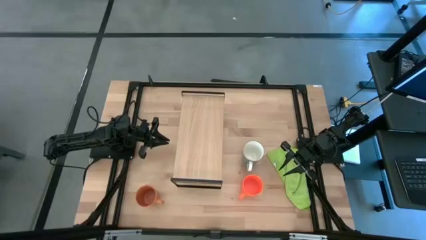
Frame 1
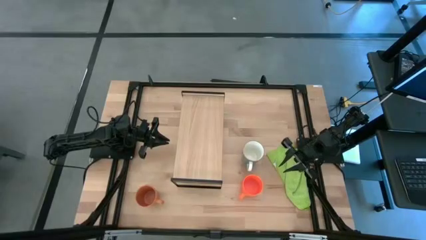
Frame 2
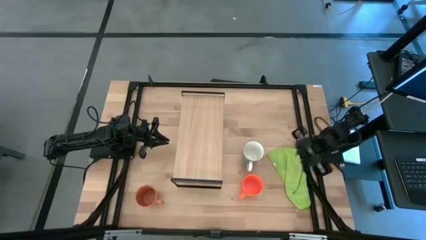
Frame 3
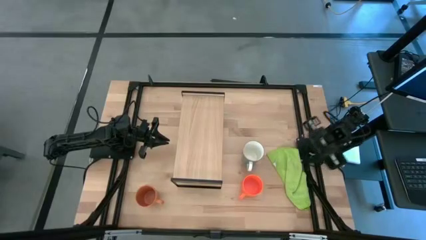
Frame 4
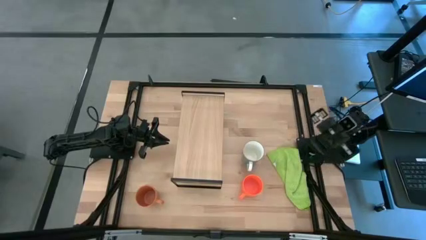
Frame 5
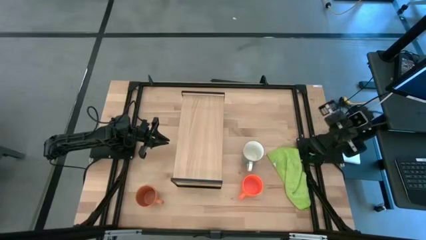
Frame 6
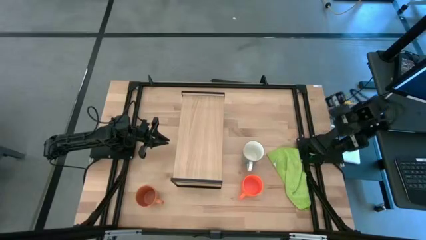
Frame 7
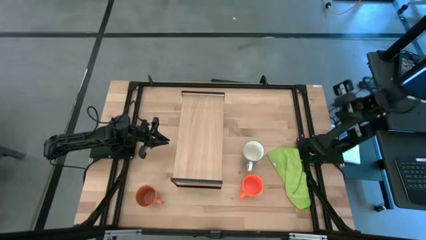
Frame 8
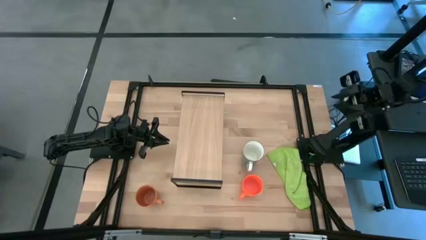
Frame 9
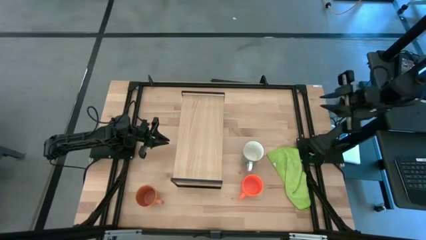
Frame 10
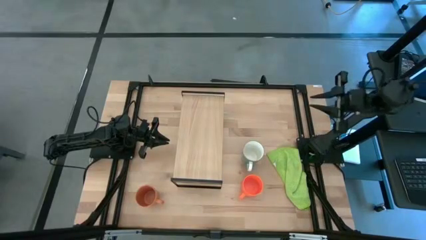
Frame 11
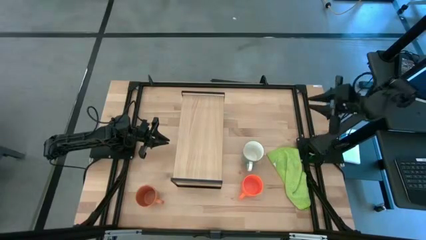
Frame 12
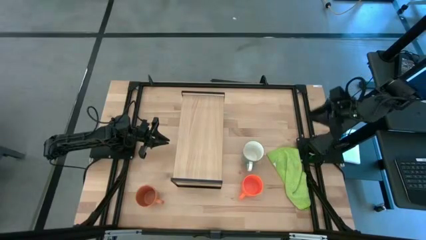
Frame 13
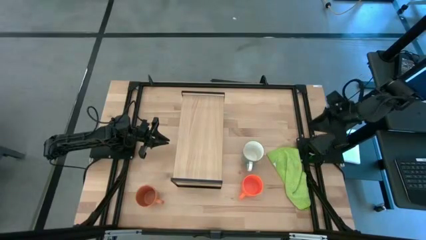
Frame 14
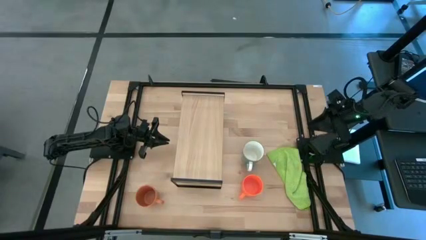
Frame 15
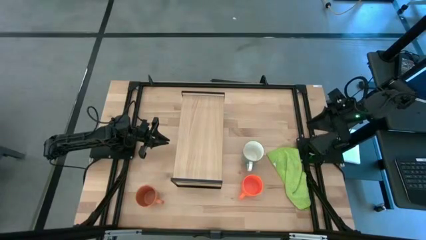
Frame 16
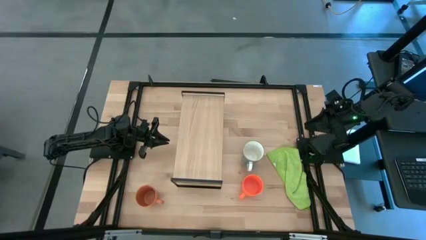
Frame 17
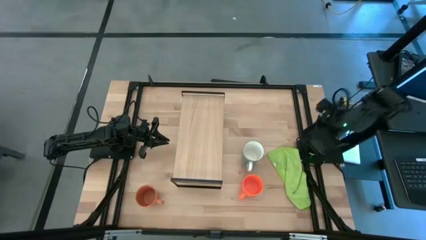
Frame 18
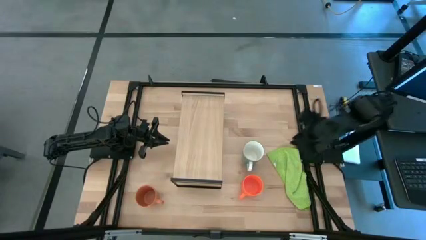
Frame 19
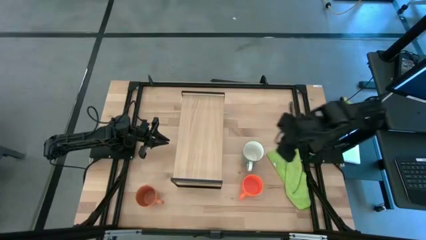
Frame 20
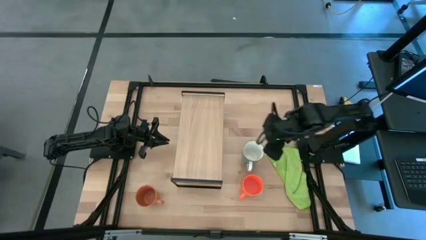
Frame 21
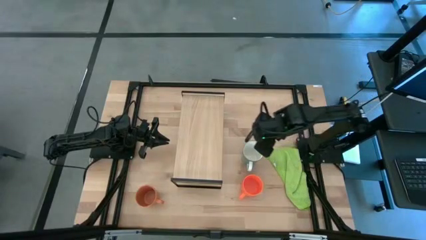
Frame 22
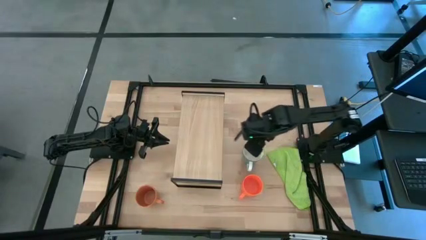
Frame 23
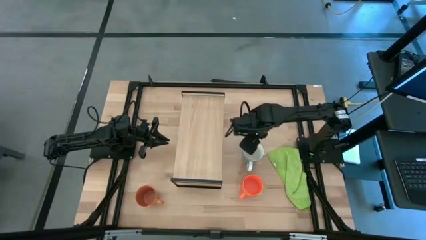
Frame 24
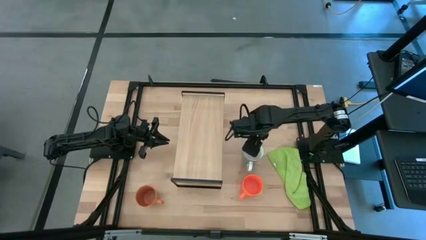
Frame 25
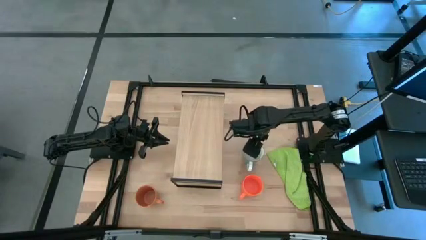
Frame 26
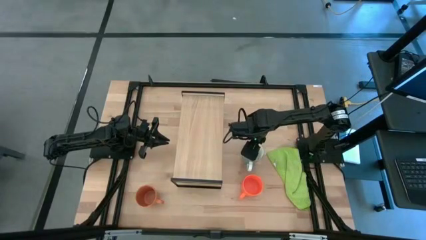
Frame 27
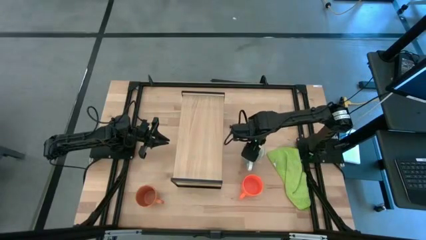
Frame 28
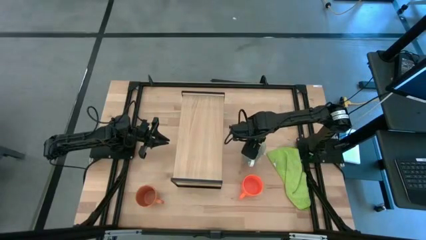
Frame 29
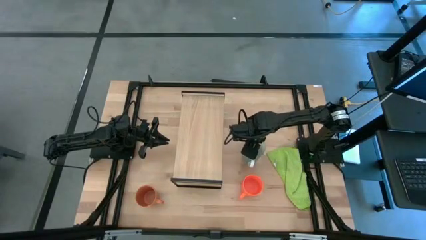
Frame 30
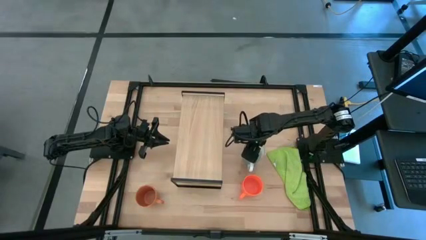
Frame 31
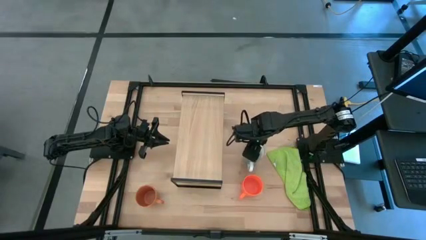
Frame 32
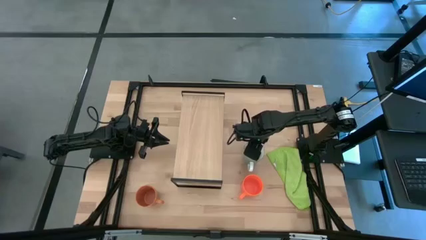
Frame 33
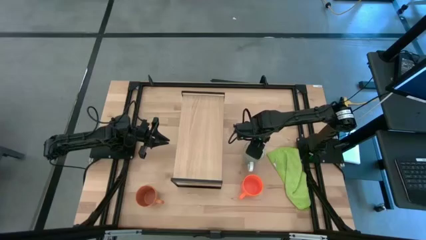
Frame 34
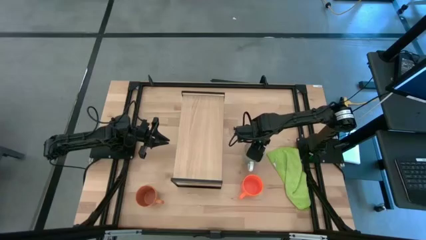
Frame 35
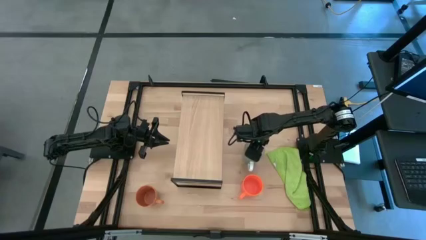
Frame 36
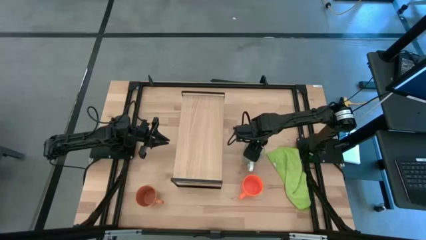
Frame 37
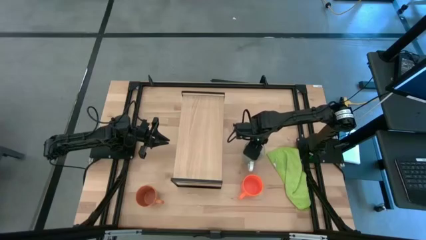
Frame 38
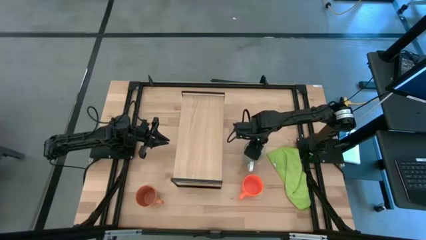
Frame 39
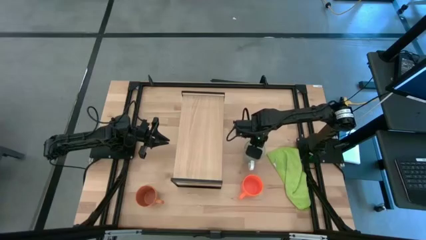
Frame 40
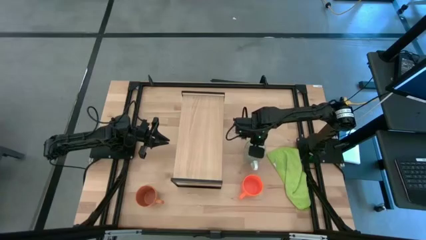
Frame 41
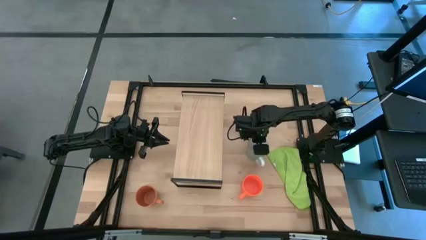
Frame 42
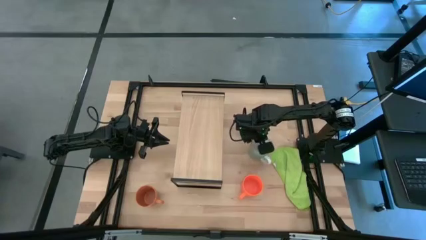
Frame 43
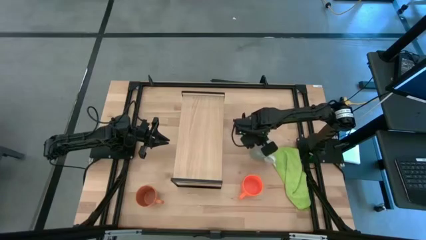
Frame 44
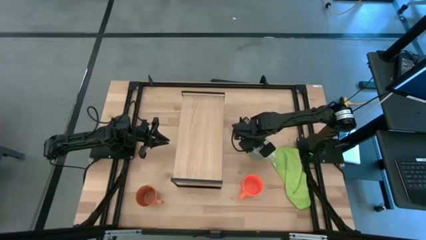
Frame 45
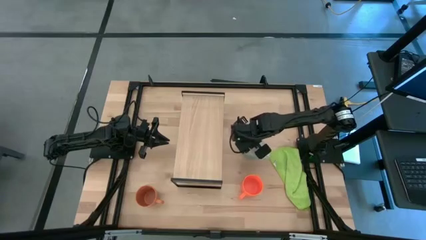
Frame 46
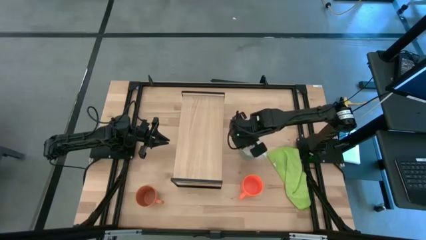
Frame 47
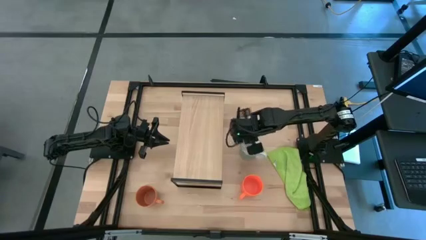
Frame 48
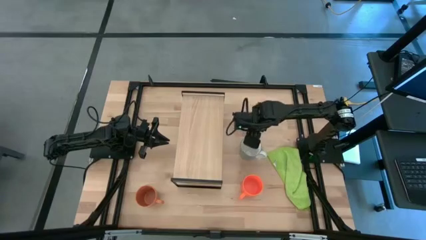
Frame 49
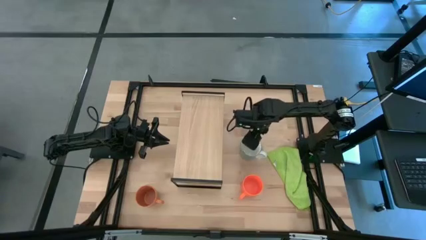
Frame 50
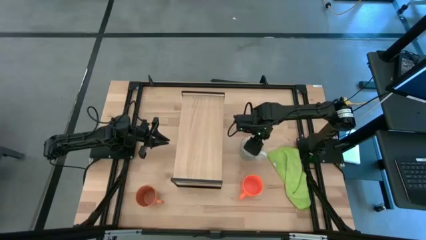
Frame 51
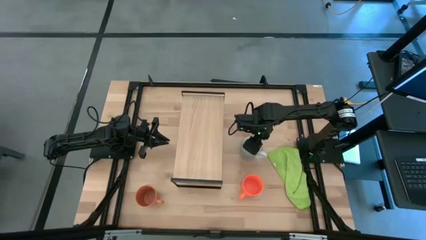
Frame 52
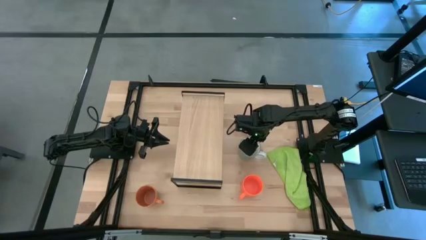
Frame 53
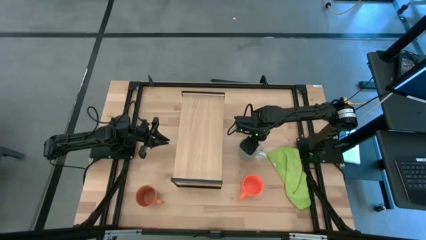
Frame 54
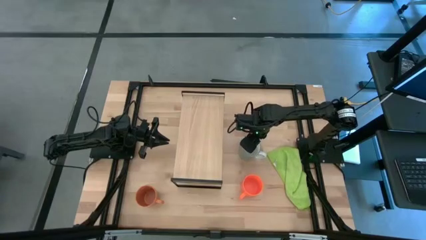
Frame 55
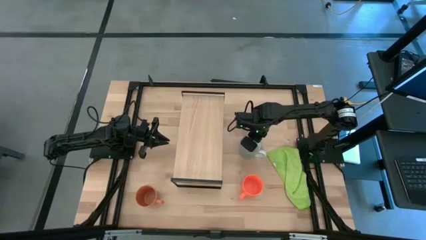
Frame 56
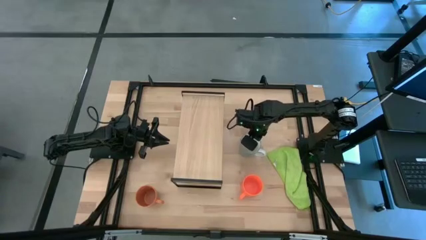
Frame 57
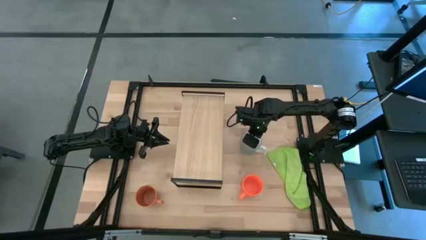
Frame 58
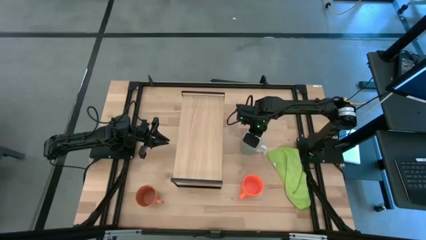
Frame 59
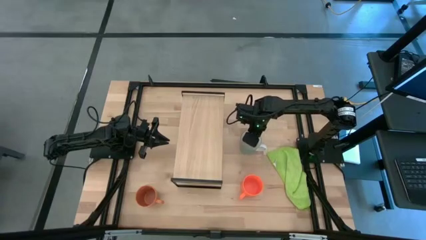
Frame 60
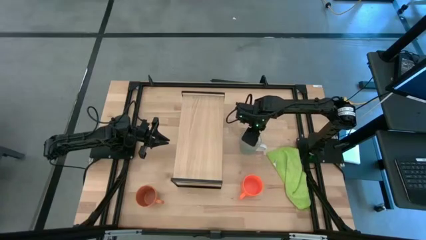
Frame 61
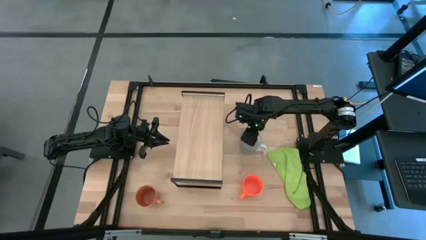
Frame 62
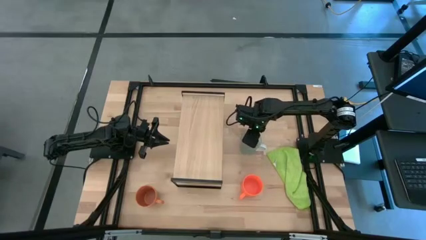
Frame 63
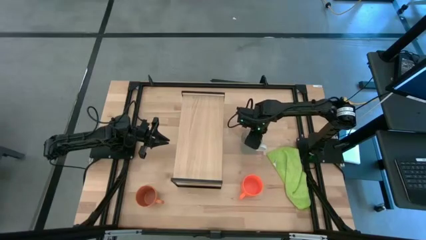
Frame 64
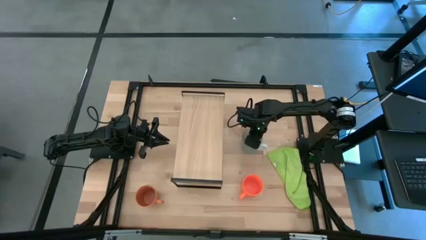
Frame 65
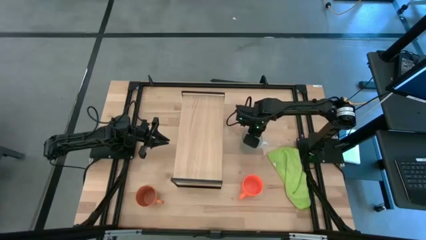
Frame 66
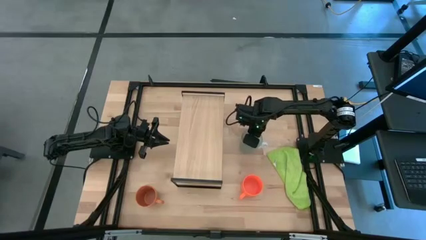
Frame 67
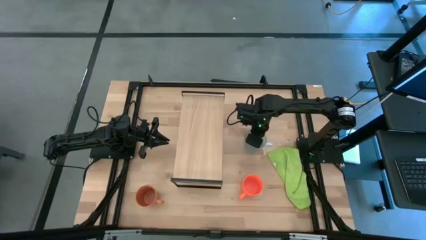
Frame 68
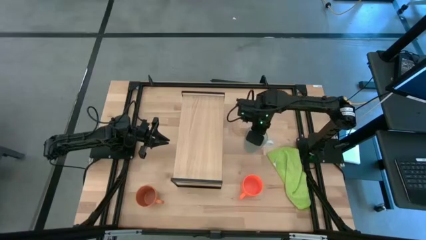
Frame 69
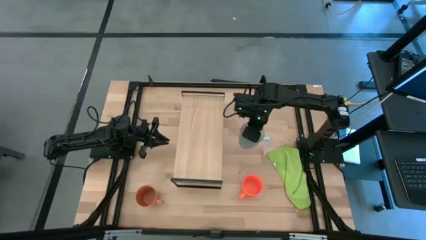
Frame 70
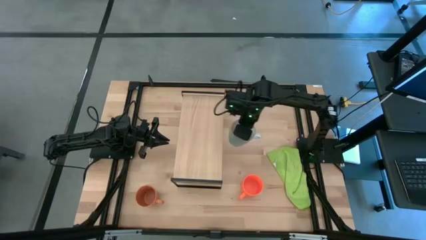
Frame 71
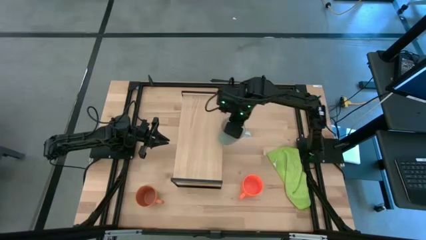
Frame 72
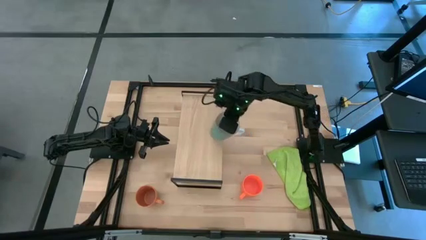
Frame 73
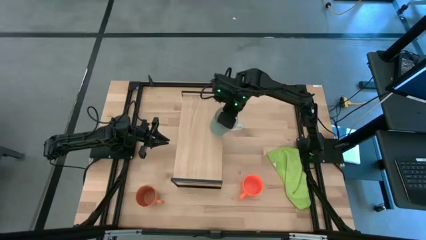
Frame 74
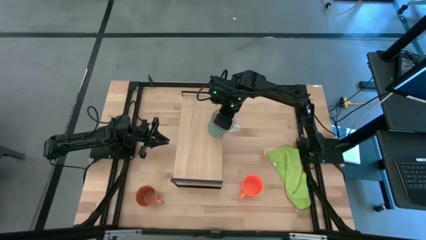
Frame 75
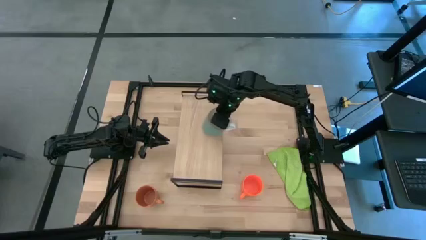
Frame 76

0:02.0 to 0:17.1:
Task: Stack small to large cups/mugs on shelf
Put the blue mug on the shelf
